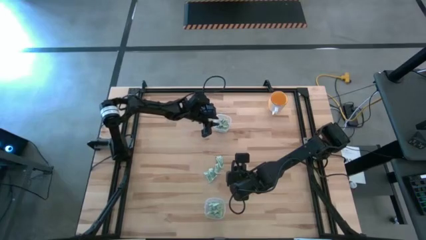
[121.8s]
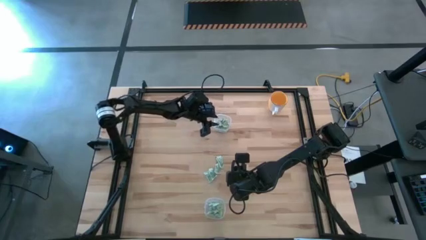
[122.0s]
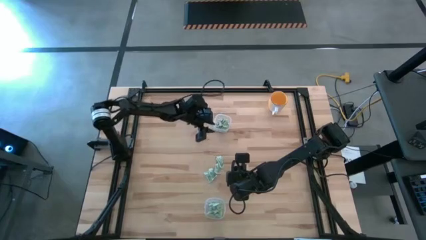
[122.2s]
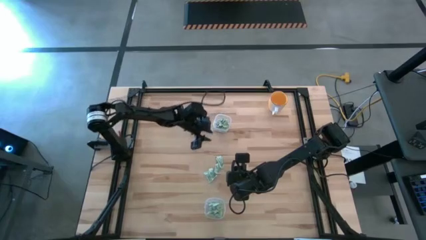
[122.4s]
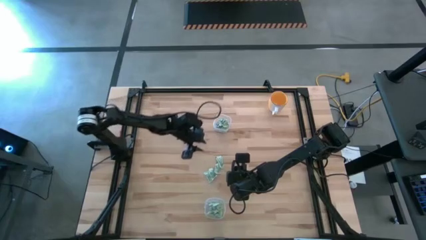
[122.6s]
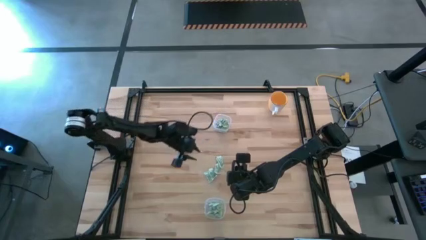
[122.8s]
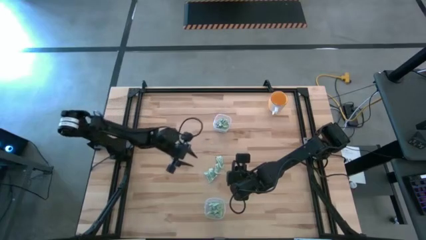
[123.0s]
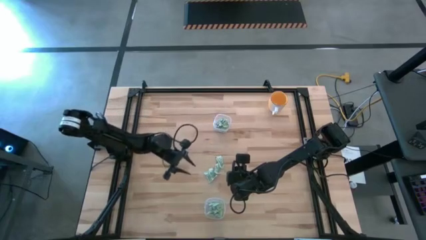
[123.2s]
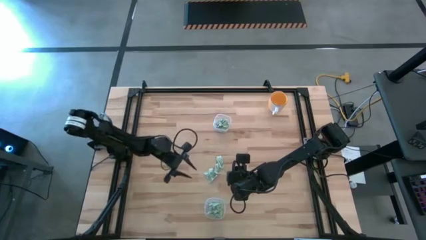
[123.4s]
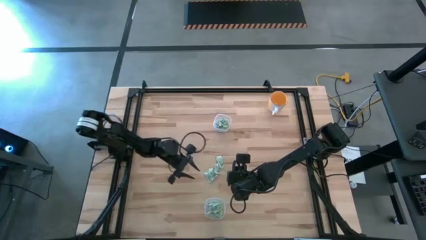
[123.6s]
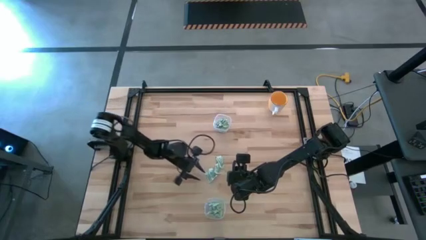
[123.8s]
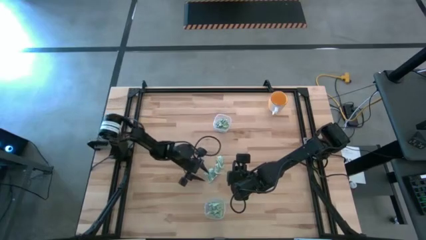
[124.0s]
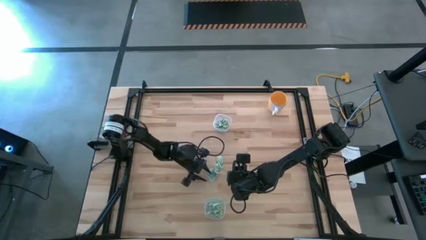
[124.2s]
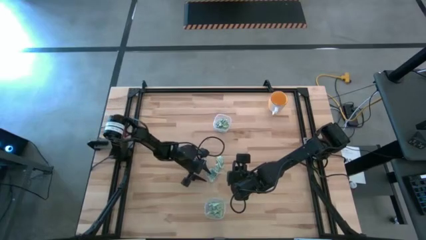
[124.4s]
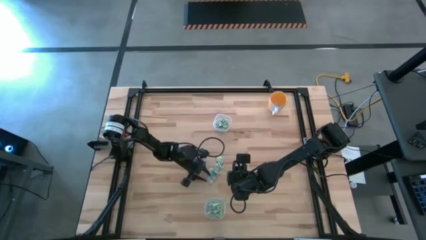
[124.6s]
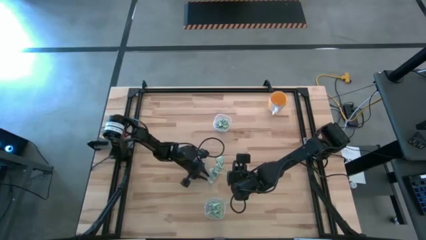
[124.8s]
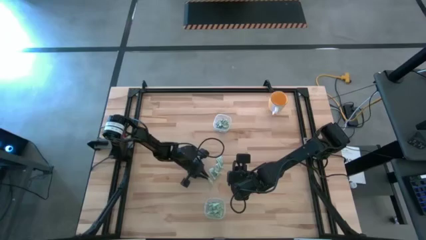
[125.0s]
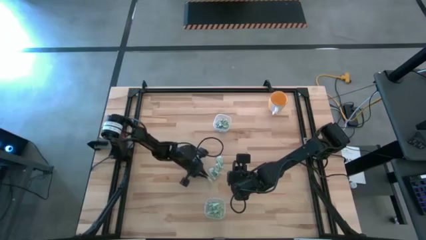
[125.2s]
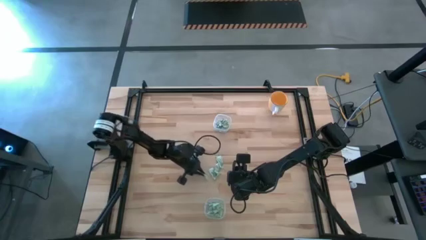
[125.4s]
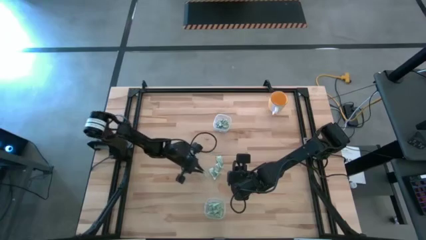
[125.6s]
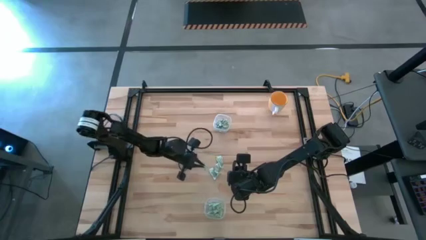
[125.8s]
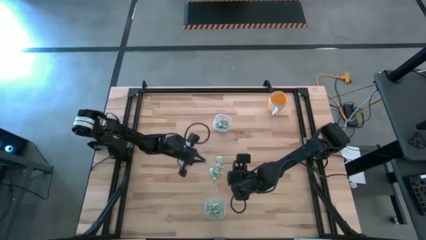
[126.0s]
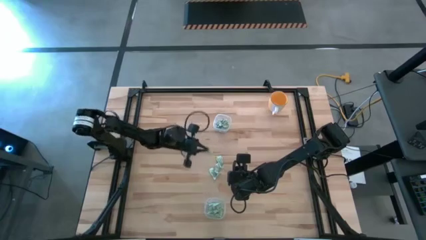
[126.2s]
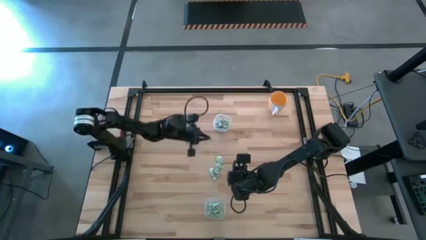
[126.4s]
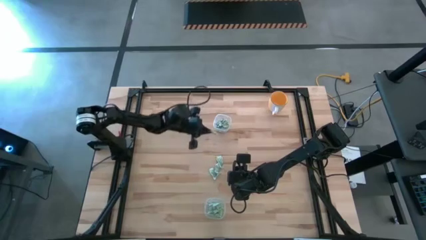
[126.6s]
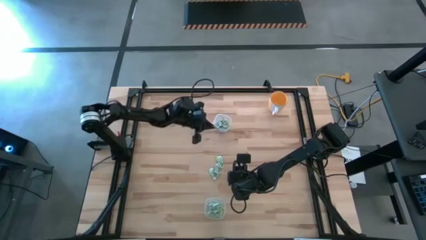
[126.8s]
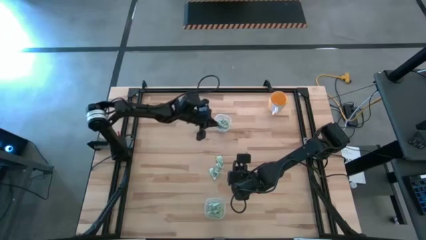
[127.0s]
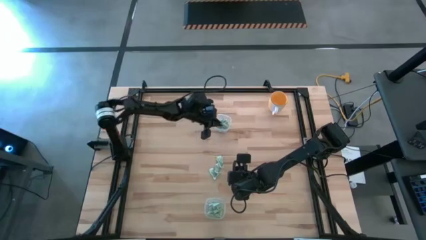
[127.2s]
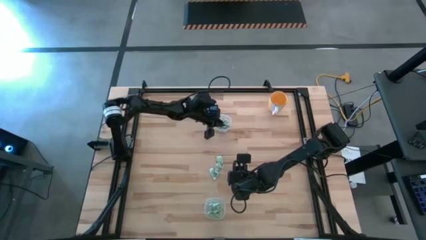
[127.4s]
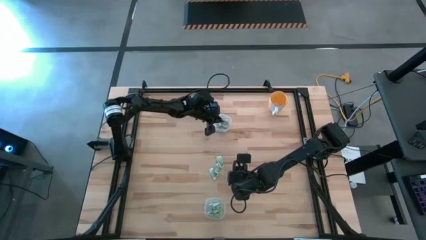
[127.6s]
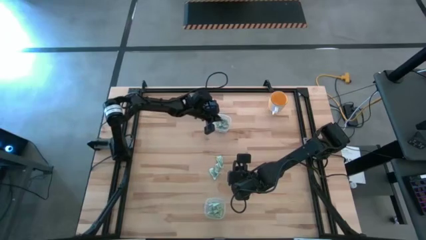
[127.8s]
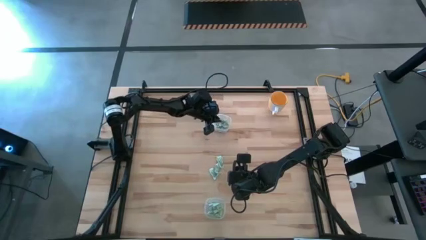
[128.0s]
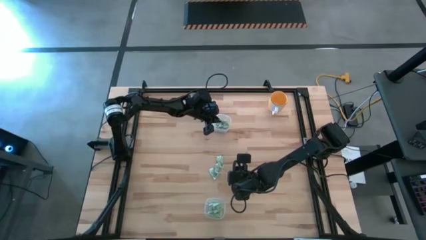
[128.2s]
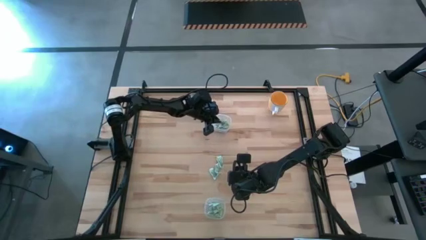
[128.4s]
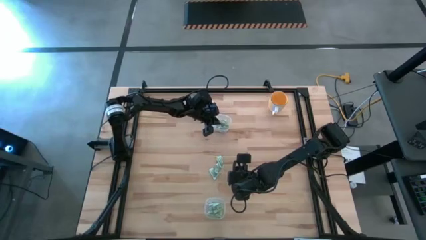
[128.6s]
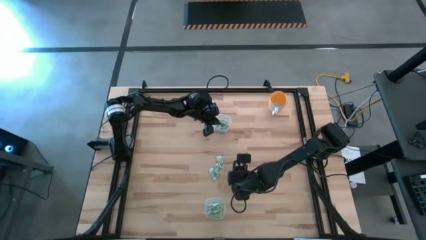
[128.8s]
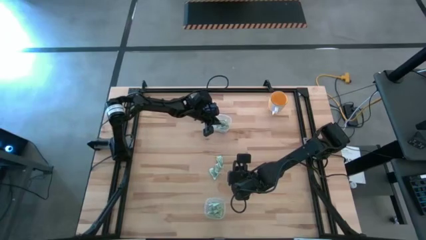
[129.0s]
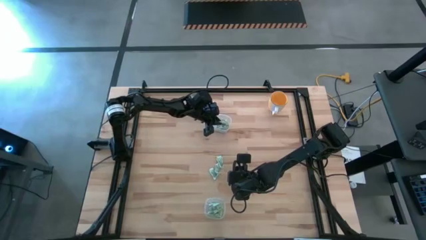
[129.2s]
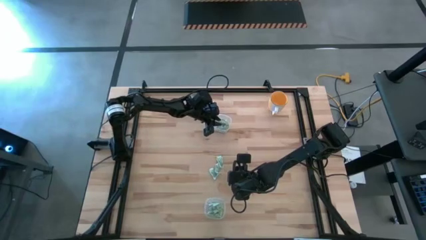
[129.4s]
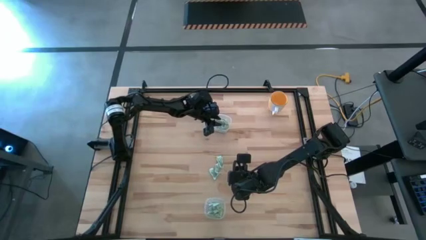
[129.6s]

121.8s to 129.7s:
Task: Pick and place items into bin
Put the stevia packet into the top transparent bin

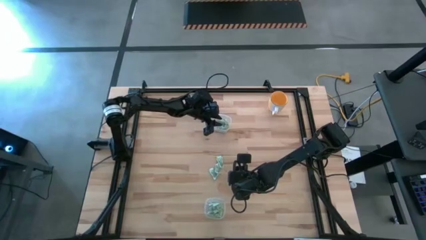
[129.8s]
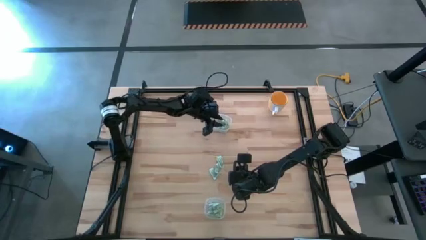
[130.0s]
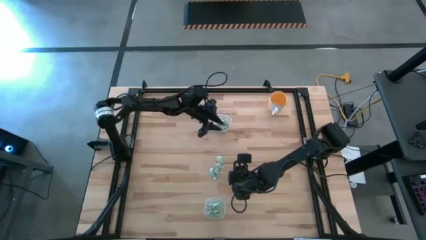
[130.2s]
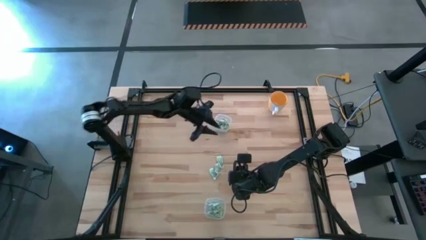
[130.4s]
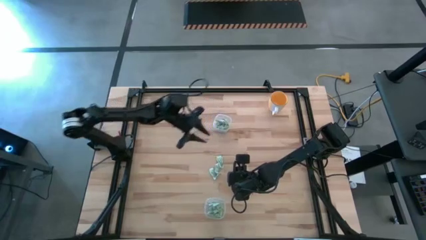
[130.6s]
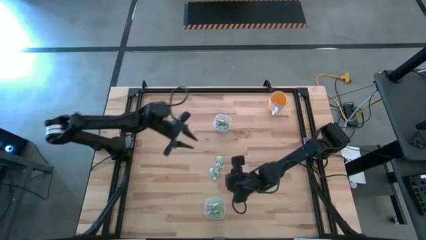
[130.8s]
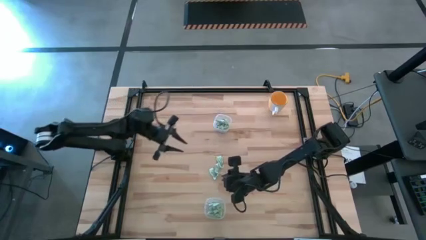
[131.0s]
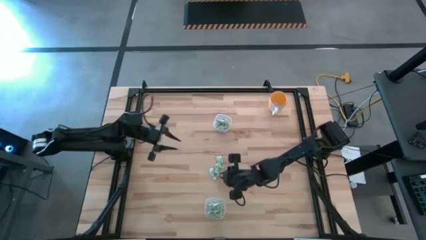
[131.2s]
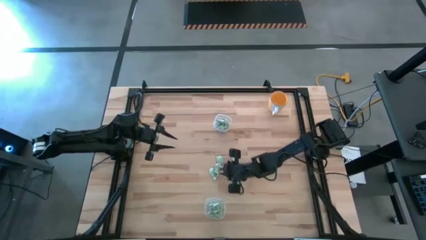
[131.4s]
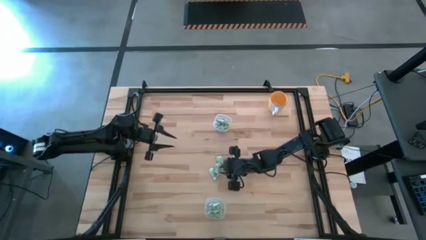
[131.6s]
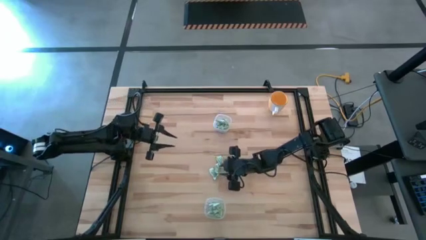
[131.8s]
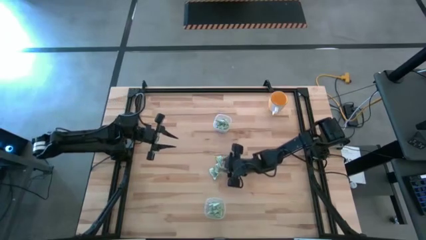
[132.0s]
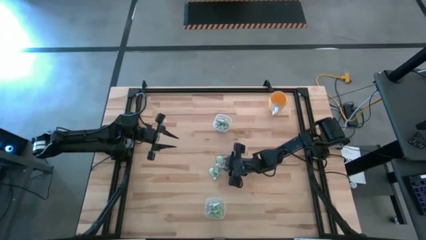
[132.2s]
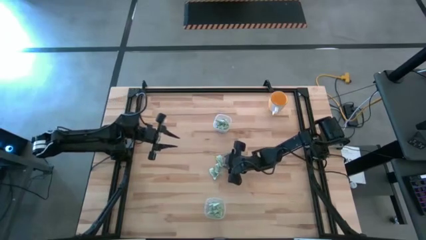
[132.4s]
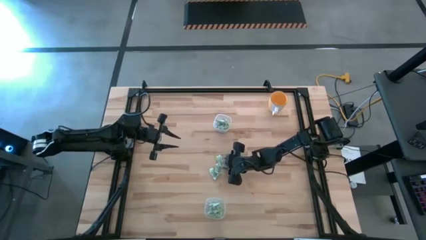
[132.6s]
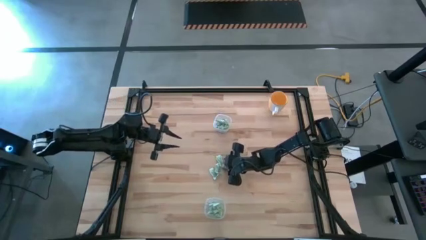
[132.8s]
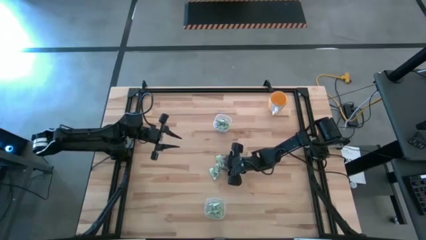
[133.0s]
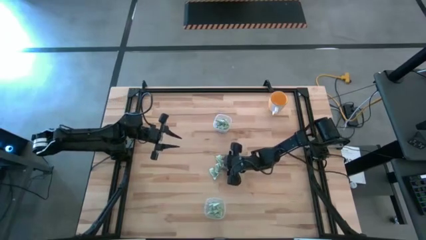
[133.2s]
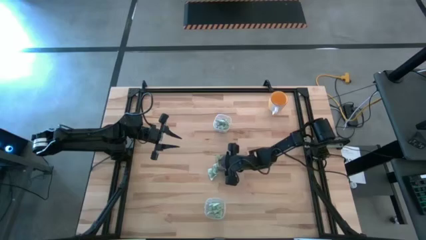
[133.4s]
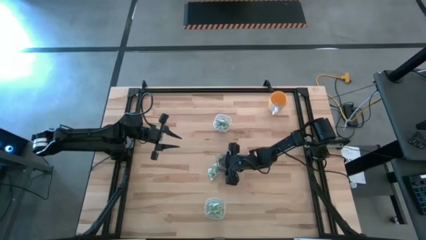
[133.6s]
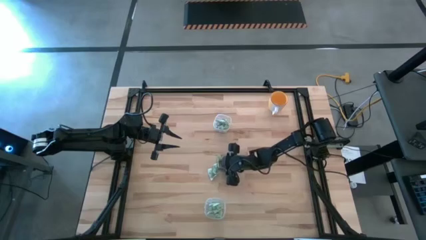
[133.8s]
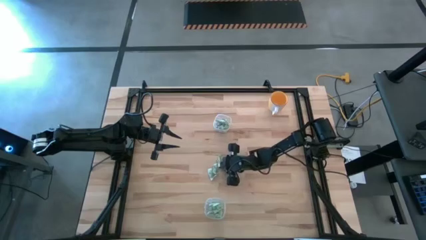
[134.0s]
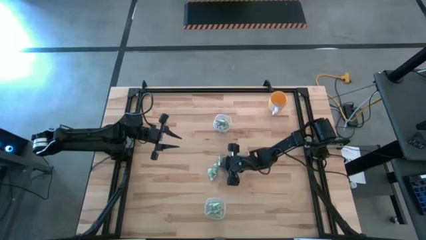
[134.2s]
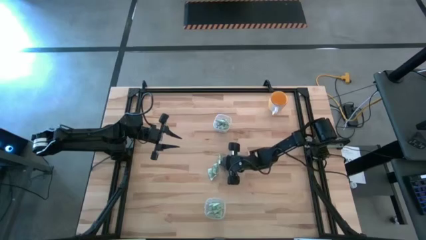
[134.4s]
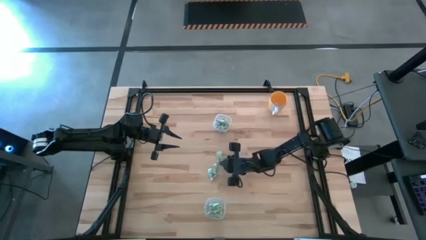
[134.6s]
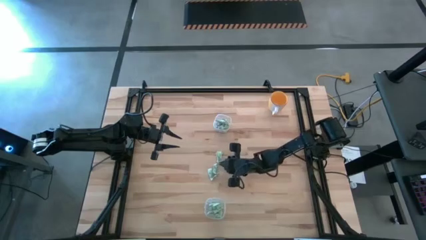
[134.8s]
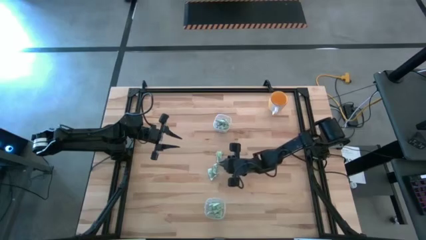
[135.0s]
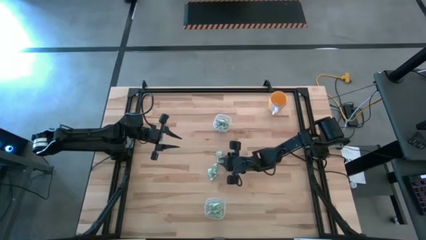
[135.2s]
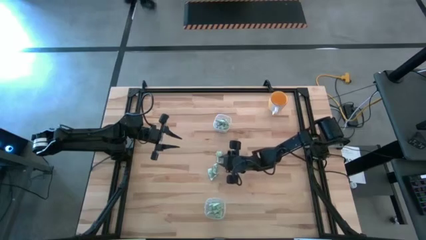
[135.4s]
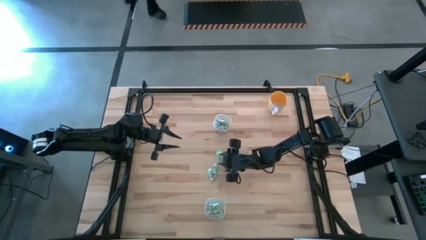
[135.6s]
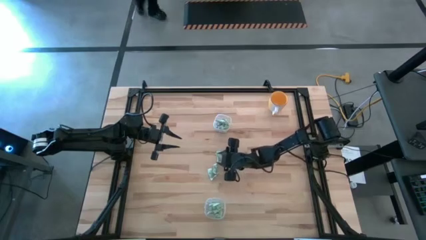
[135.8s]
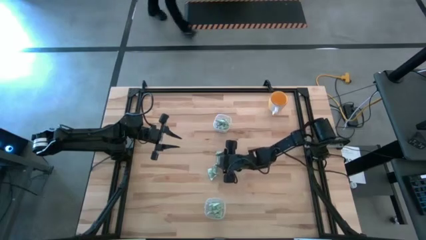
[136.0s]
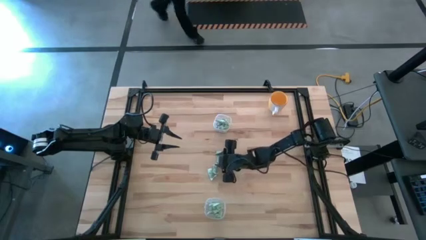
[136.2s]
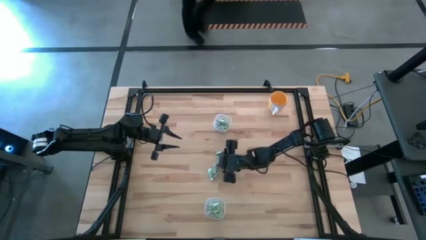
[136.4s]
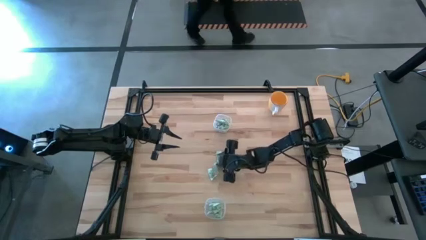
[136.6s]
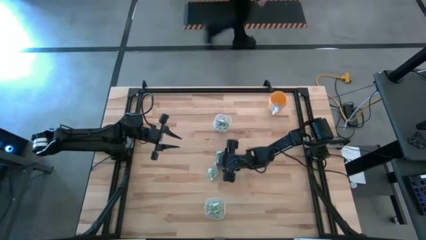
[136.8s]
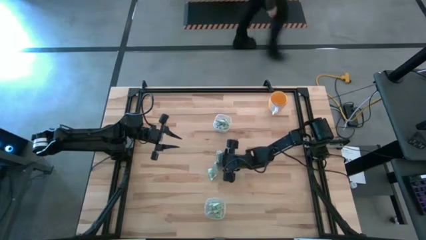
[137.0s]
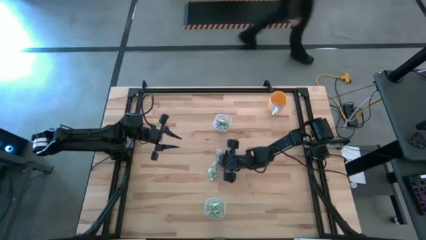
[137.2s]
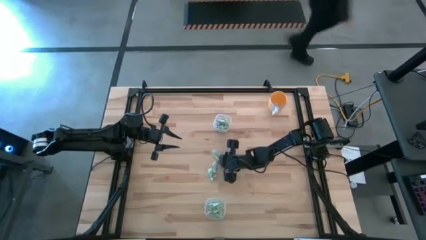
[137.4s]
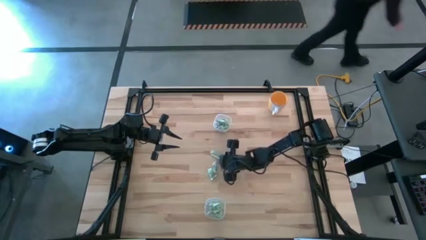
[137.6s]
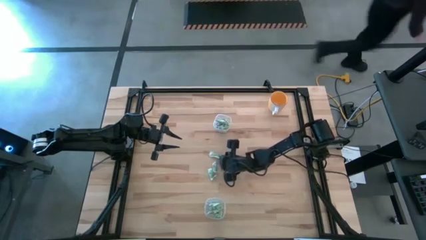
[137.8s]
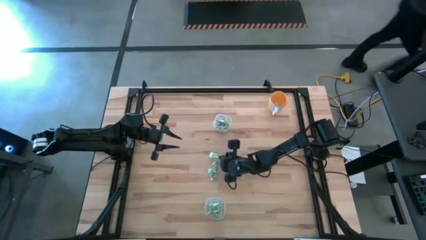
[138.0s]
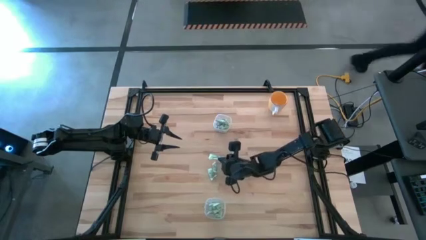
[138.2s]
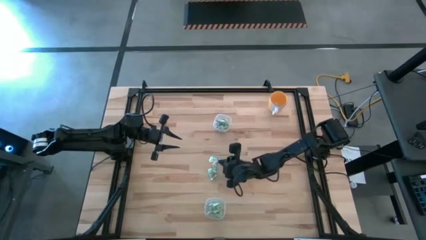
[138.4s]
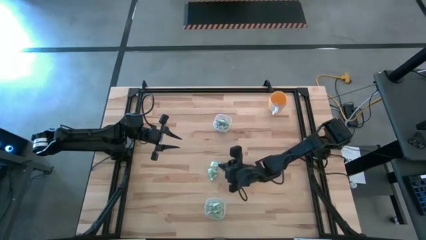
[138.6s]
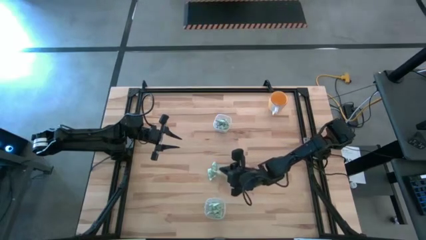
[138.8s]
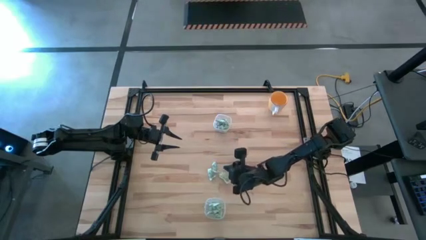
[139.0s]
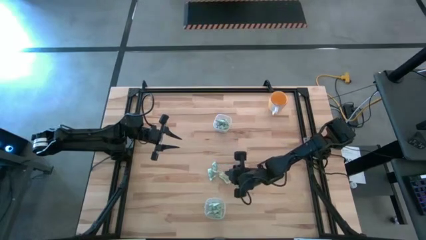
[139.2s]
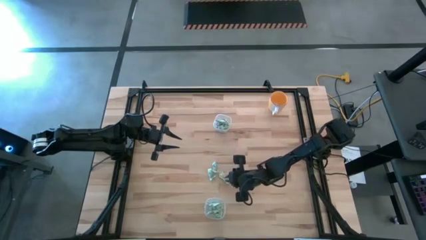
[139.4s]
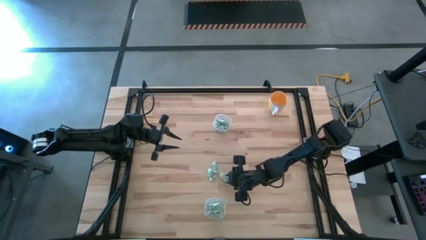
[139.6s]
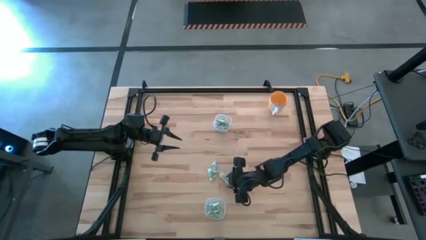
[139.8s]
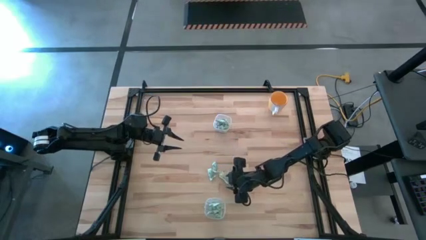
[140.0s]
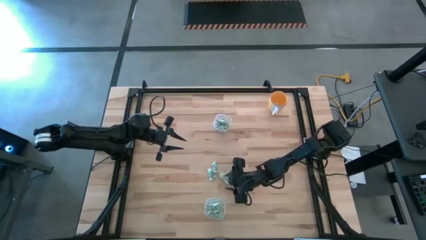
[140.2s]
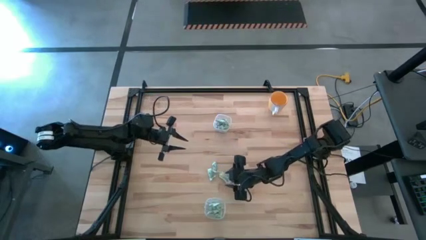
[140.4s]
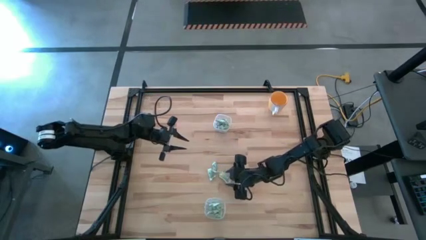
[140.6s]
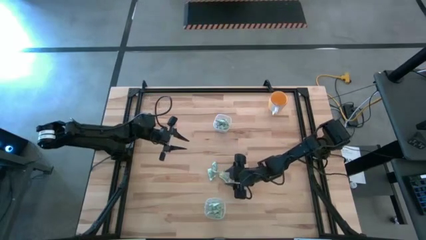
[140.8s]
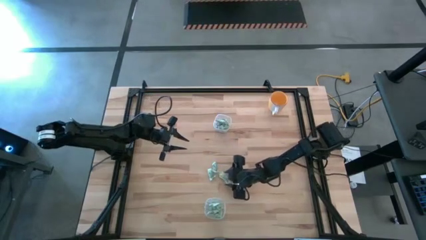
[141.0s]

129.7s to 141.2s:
Put the stevia packet into the bottom transparent bin
